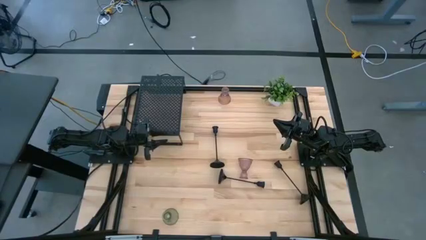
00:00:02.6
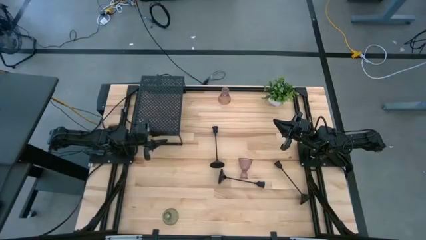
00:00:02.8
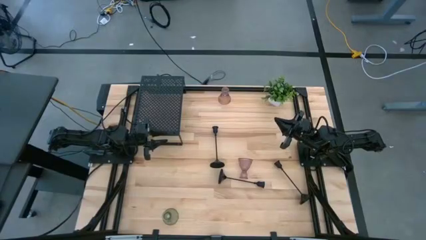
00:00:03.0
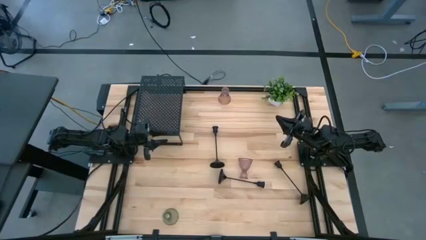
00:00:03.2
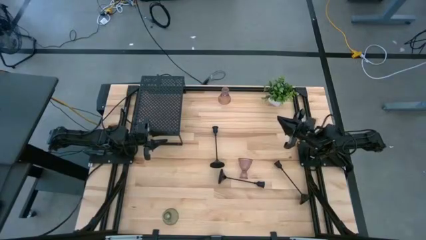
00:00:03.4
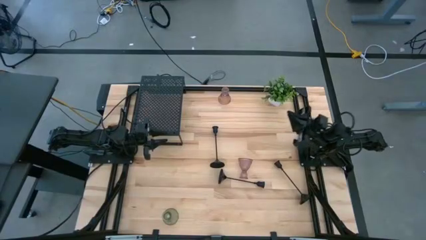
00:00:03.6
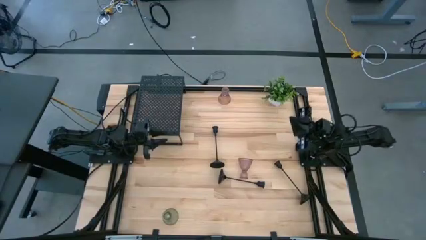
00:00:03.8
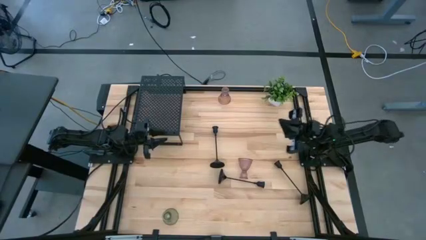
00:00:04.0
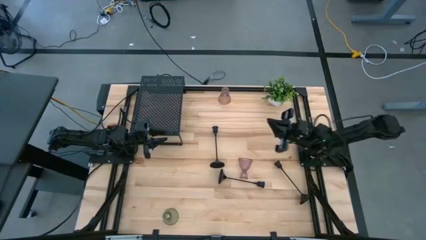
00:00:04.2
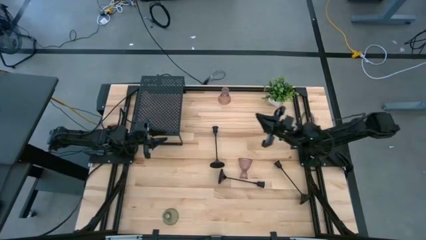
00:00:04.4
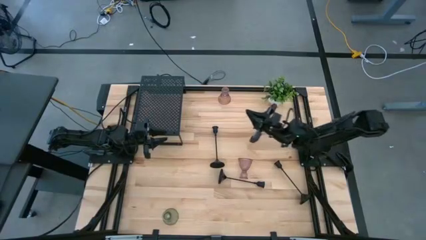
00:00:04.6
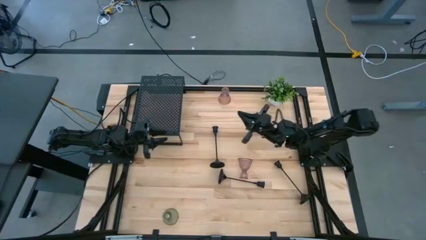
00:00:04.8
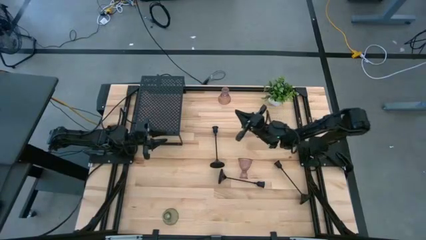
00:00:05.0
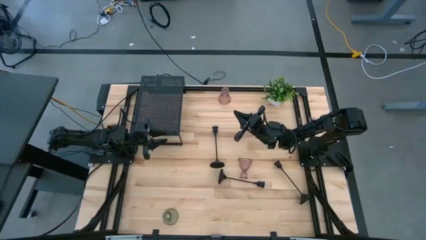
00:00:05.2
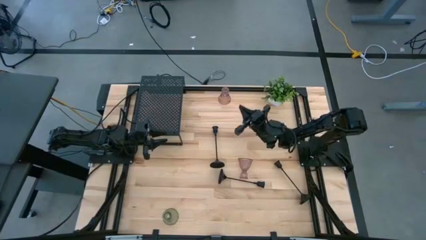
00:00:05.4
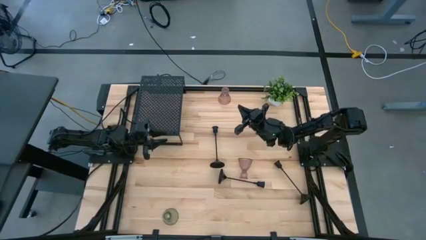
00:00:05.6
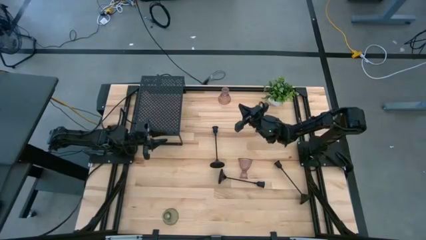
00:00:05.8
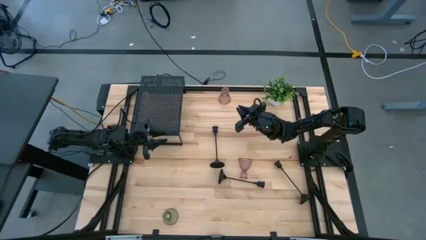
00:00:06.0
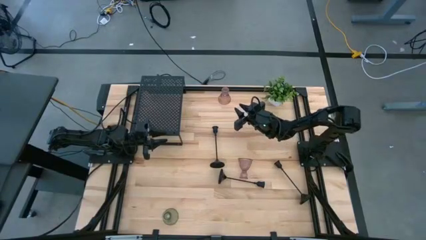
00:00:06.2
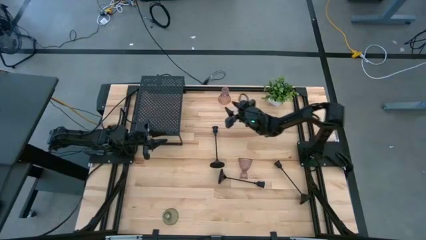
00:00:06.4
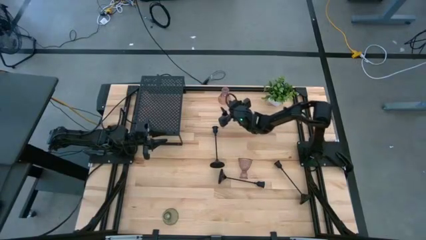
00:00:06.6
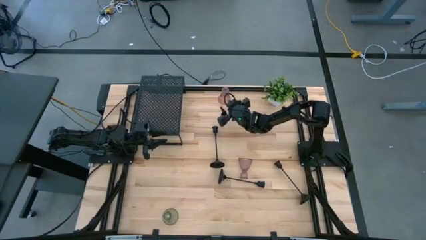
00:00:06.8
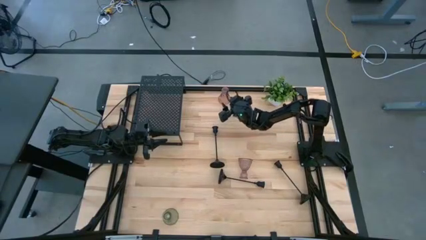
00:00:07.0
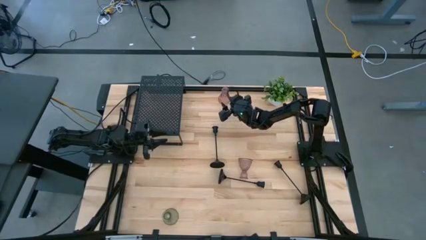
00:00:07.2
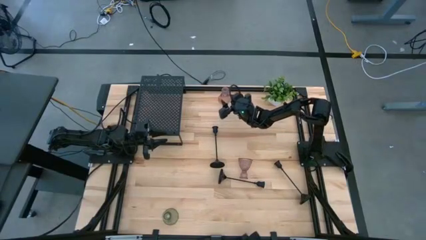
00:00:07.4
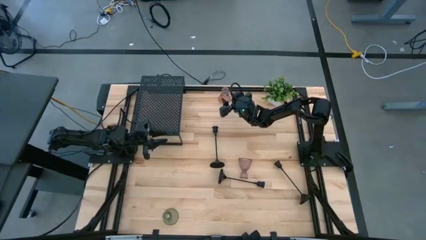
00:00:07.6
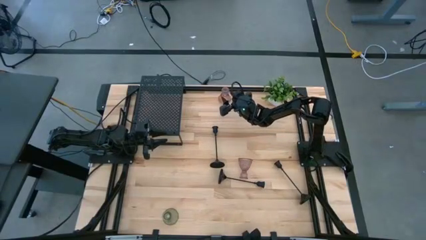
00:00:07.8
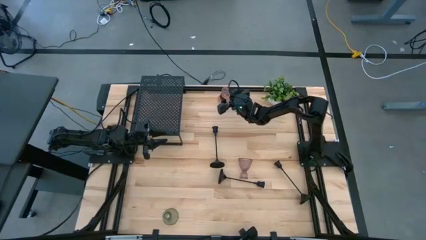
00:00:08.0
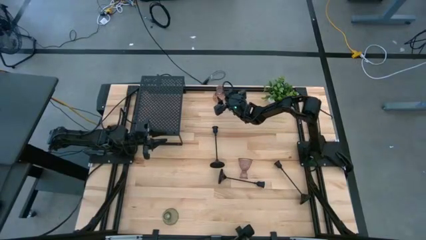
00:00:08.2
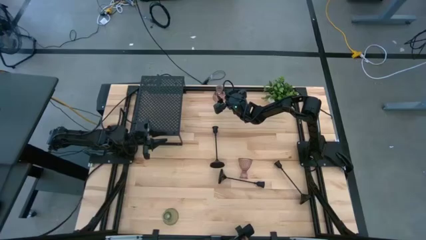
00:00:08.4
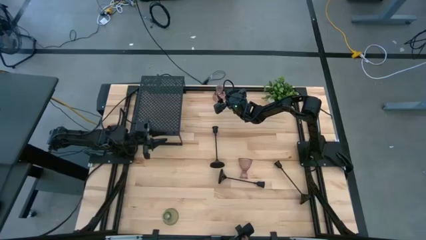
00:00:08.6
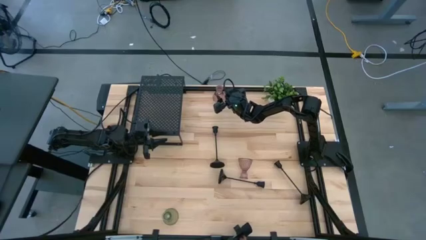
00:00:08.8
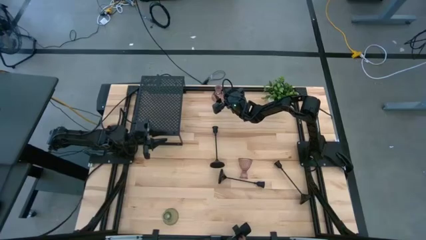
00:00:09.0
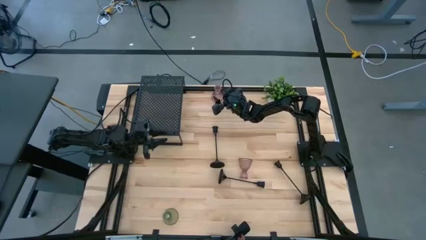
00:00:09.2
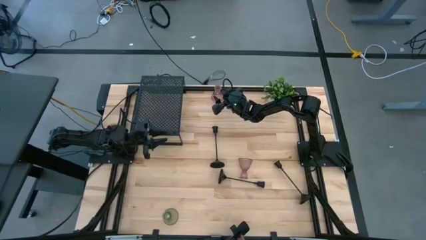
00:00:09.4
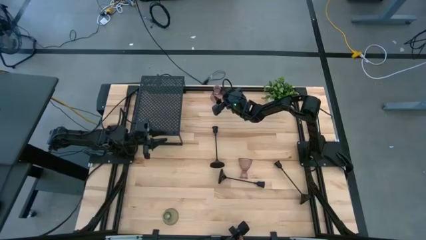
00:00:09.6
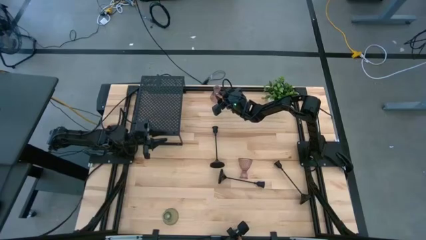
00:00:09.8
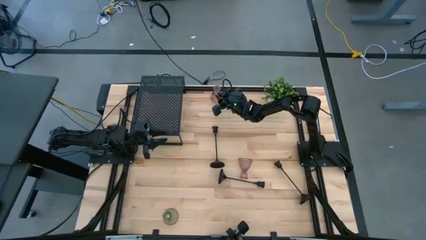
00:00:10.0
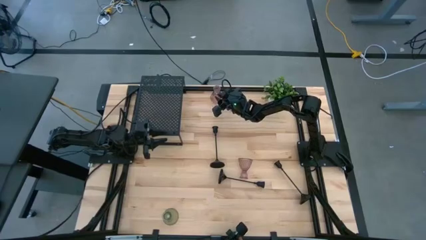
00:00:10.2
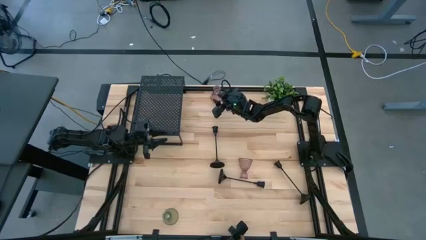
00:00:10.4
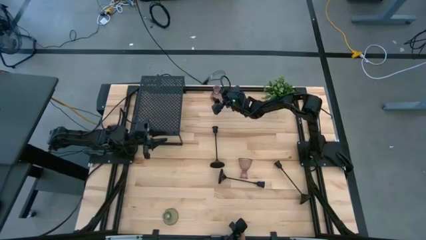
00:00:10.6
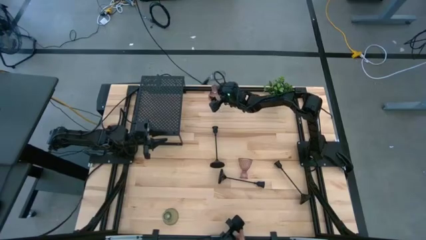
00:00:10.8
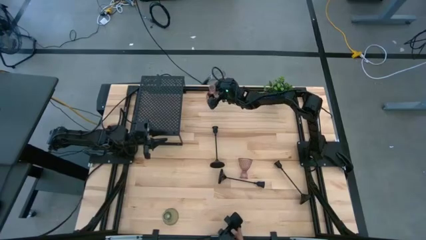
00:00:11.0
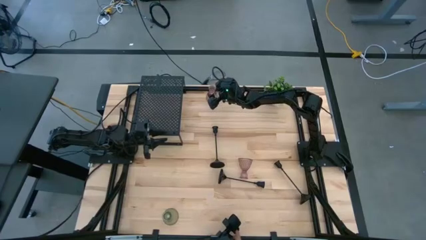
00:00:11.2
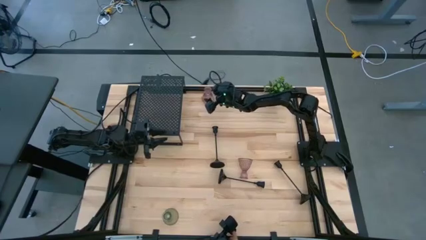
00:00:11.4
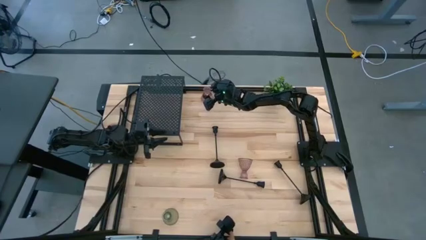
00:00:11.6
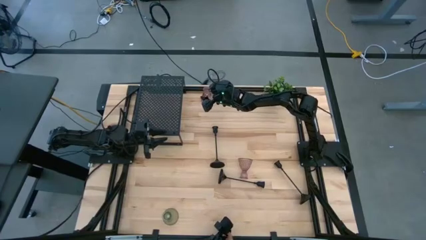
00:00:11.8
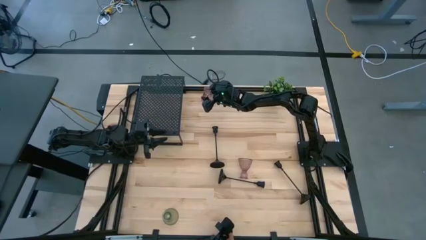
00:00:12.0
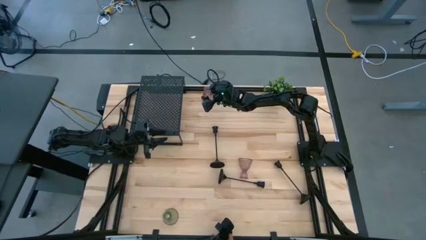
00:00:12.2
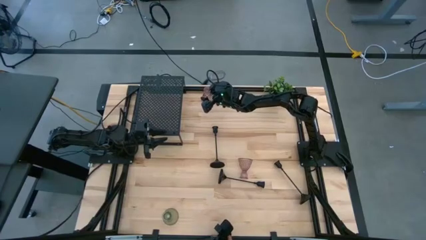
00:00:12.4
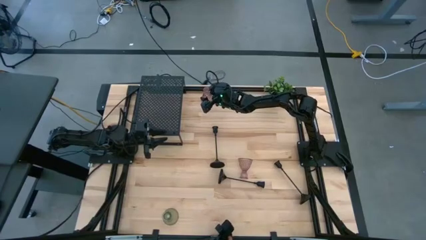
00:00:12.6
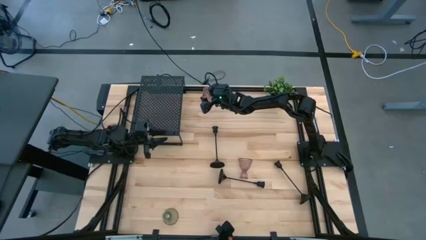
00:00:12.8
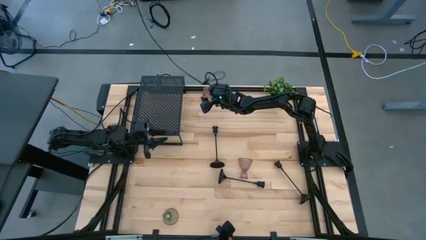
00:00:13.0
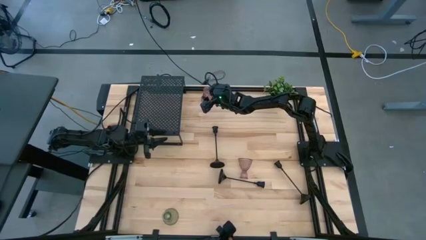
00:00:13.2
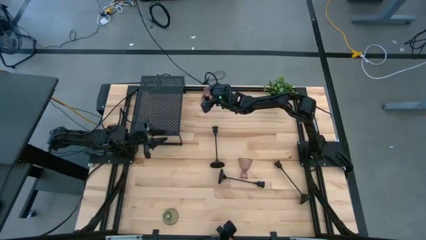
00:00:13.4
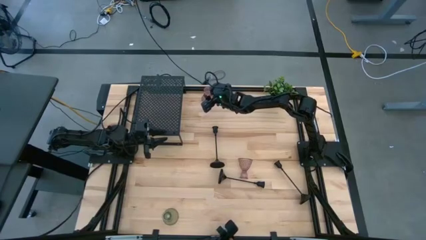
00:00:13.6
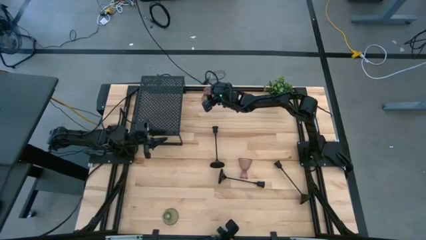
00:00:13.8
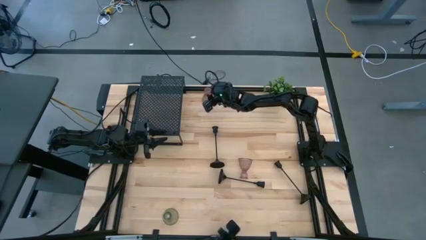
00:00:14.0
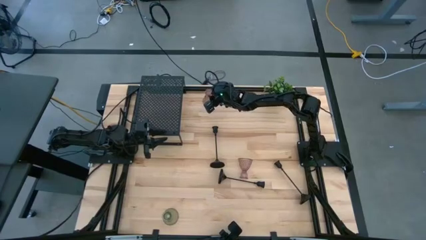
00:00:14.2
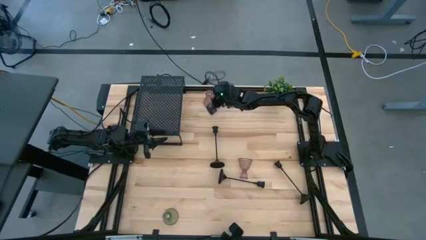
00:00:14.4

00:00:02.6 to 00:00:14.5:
Task: Pick & Place candle stick holders
Put the top pink candle holder on the shelf
